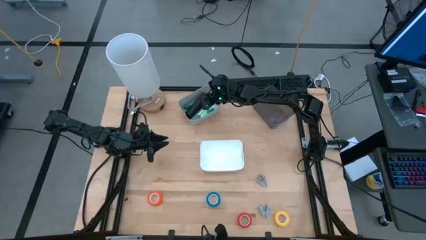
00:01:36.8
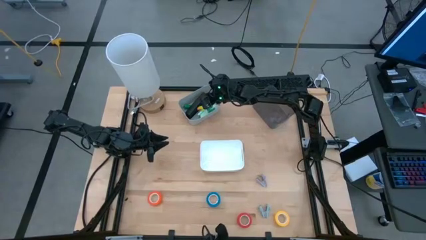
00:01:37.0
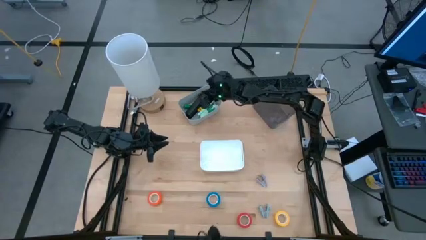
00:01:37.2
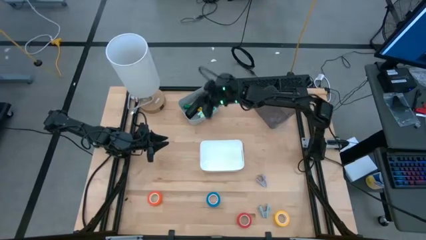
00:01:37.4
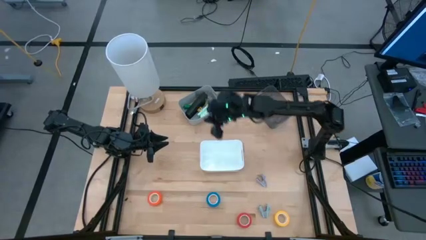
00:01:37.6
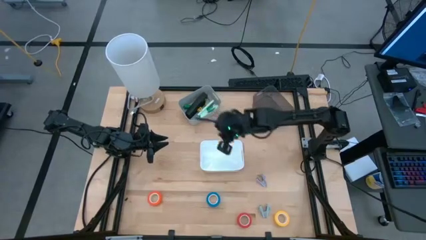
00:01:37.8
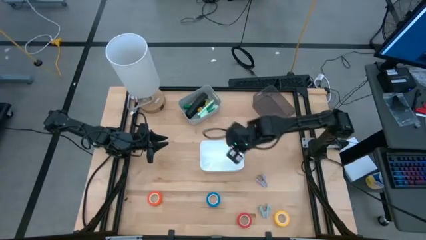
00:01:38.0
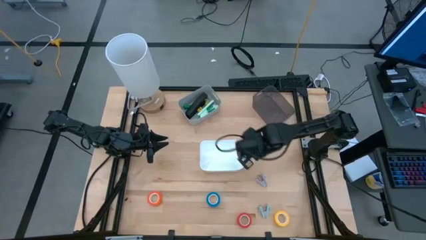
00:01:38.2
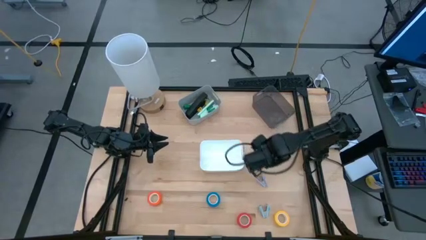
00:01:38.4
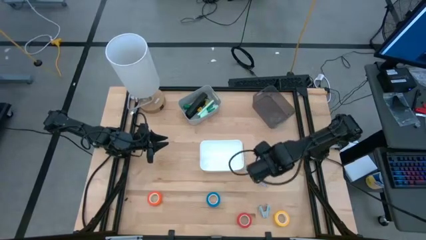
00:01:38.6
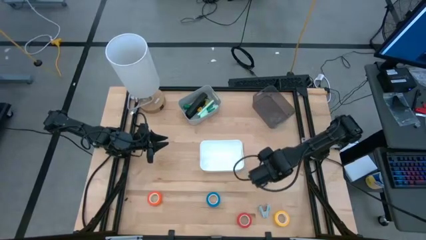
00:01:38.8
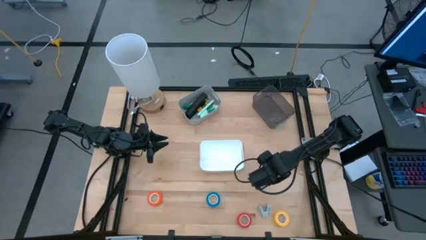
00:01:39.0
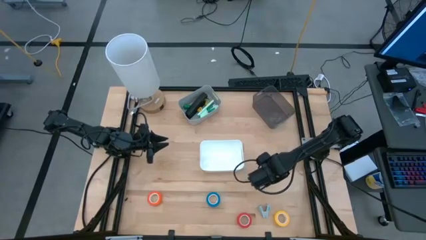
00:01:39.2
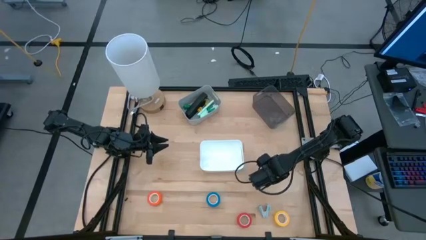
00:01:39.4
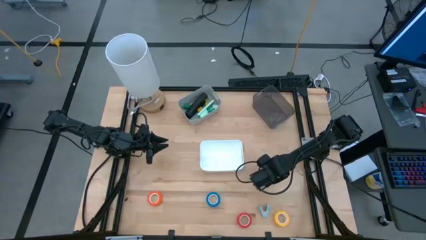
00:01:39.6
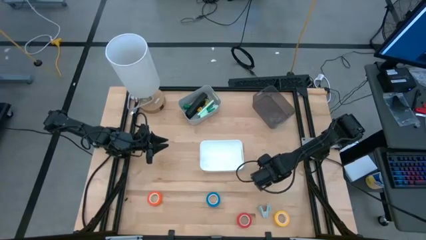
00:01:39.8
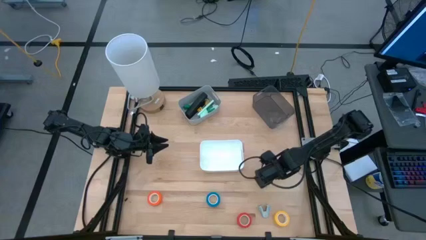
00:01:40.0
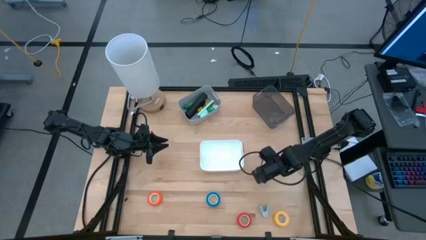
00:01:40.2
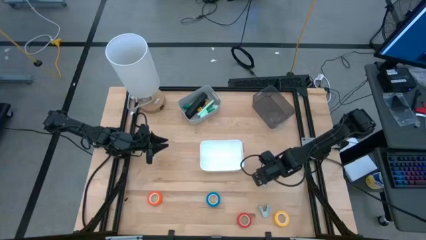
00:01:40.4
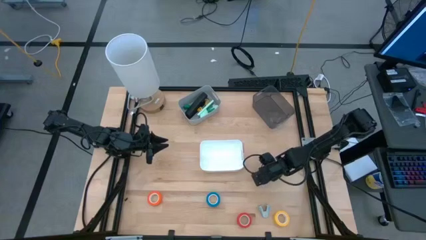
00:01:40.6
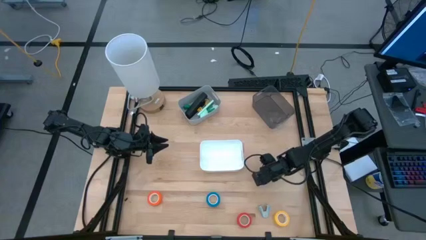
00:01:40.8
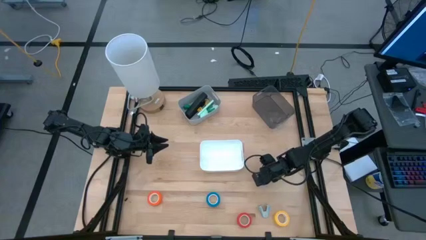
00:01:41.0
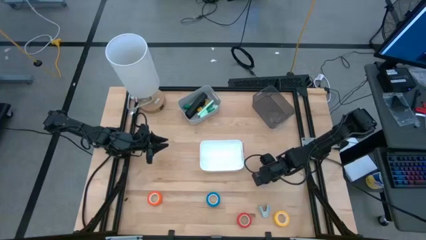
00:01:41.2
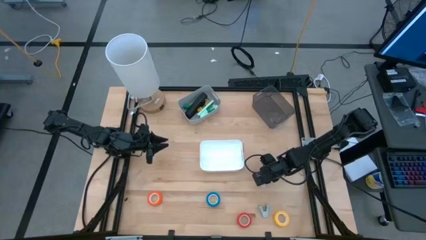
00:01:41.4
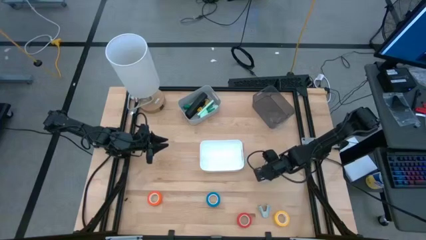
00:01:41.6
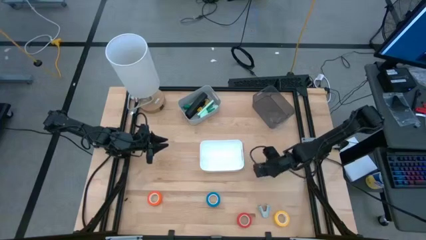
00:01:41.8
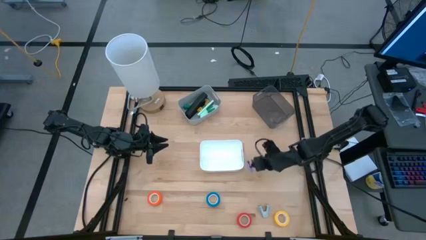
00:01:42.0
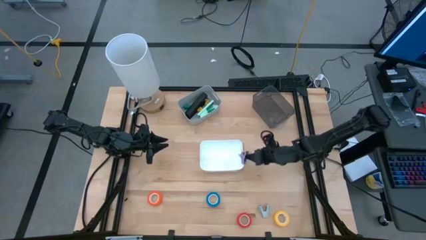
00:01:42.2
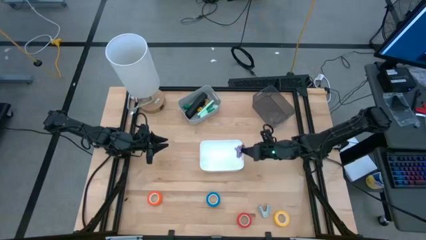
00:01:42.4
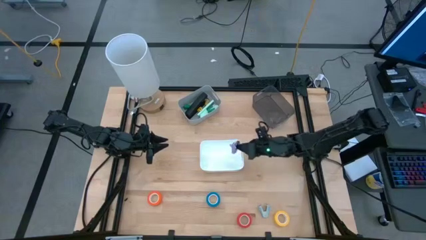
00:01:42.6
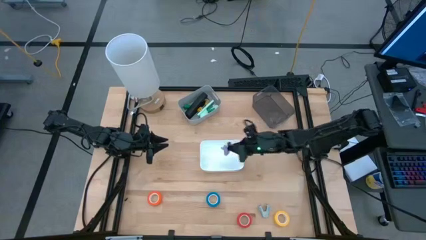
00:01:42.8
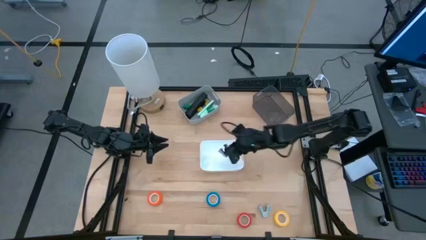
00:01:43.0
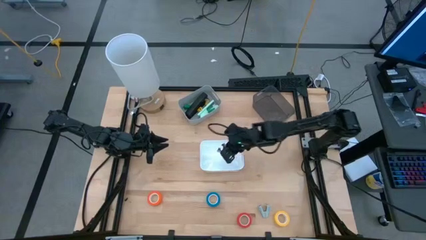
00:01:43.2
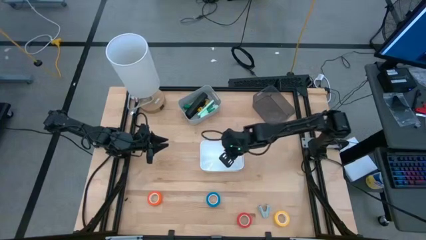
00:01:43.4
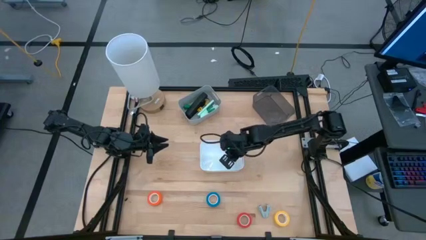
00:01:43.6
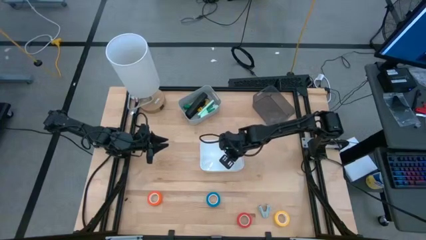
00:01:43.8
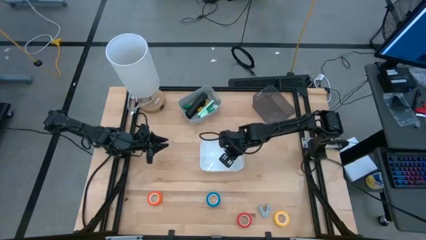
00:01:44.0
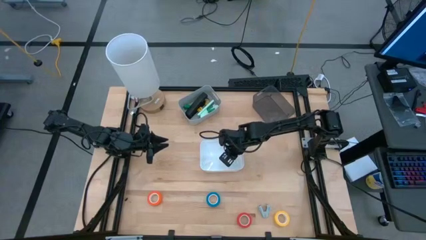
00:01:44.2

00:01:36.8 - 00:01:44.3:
Task: Pick and place Stapler, Stapler remover, tape
Put the purple staple remover into the white bin

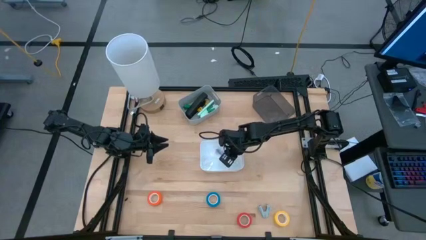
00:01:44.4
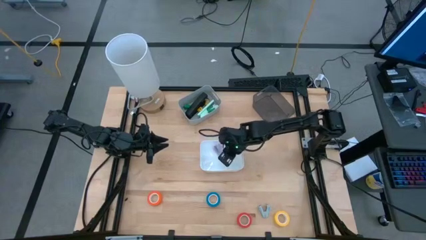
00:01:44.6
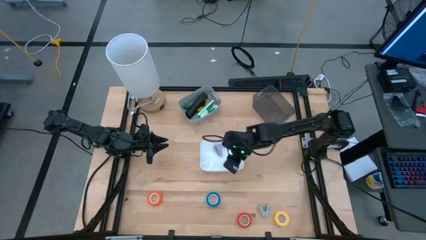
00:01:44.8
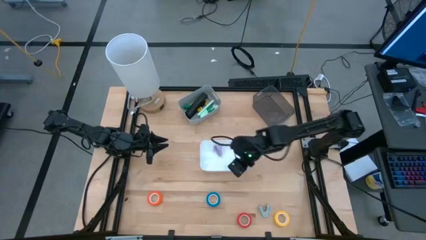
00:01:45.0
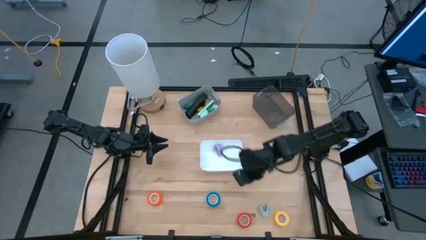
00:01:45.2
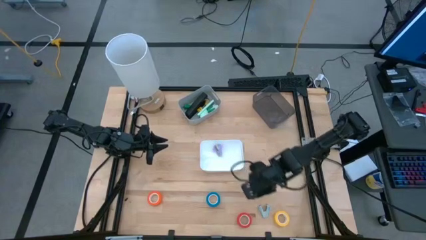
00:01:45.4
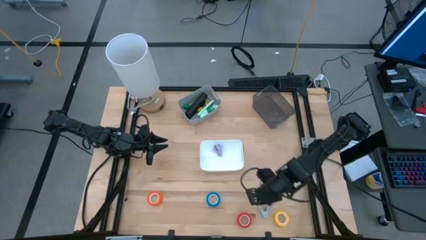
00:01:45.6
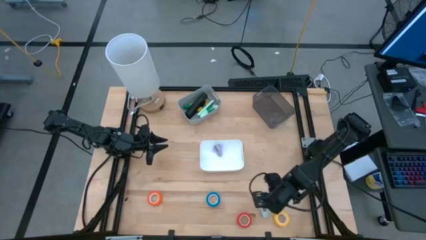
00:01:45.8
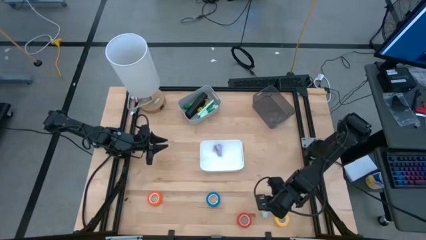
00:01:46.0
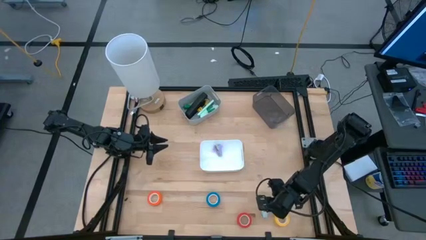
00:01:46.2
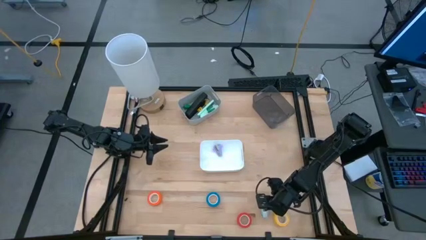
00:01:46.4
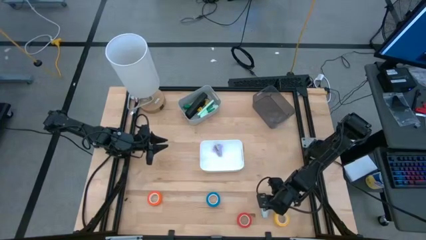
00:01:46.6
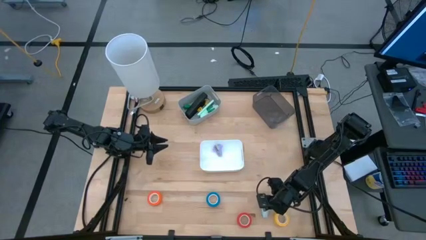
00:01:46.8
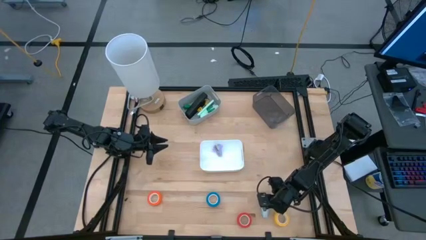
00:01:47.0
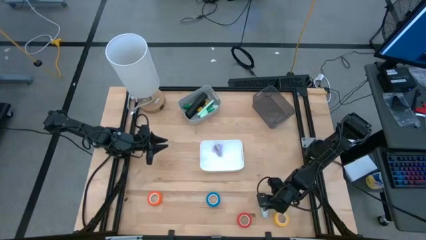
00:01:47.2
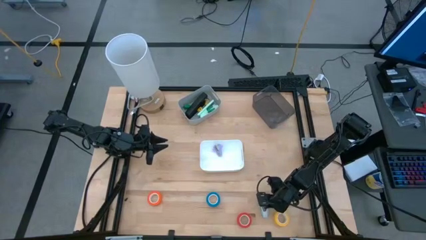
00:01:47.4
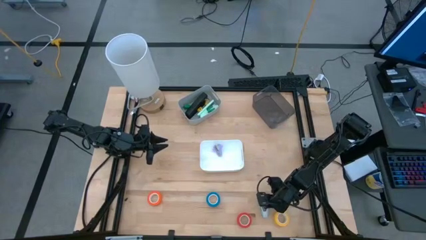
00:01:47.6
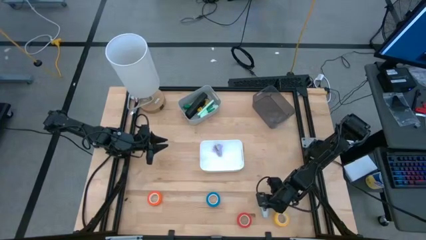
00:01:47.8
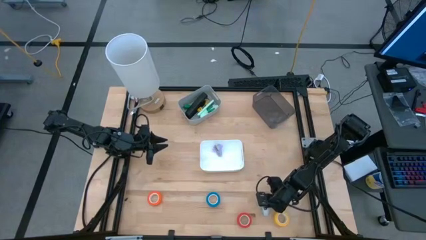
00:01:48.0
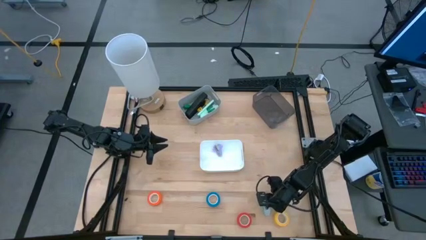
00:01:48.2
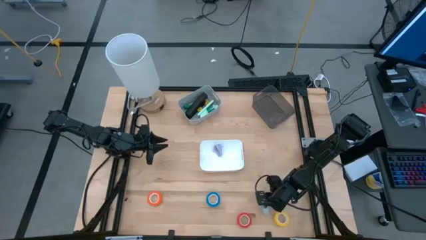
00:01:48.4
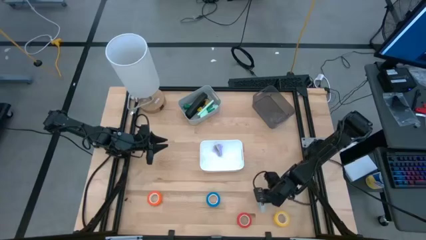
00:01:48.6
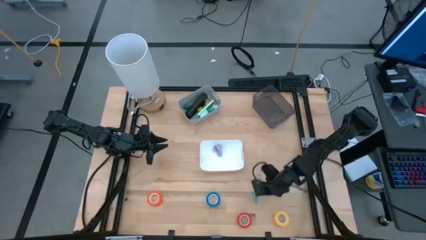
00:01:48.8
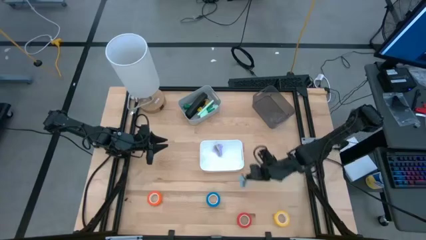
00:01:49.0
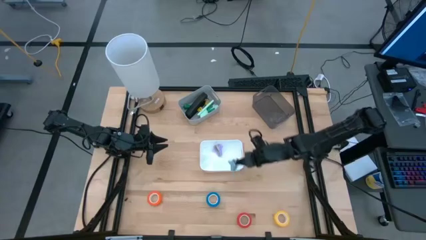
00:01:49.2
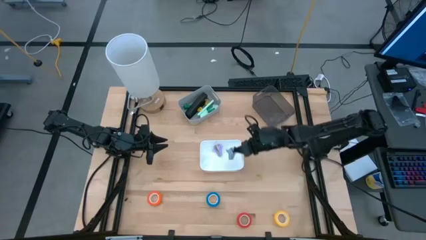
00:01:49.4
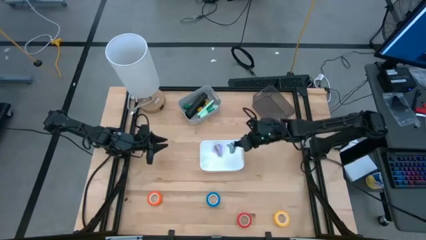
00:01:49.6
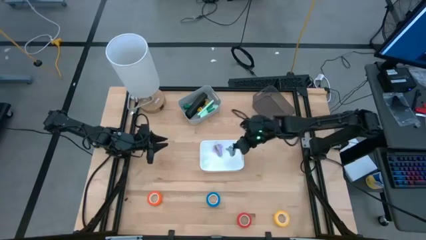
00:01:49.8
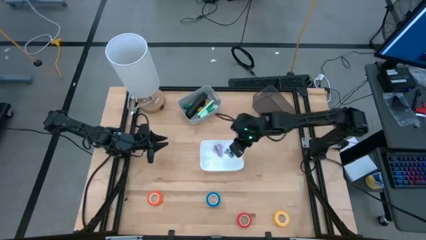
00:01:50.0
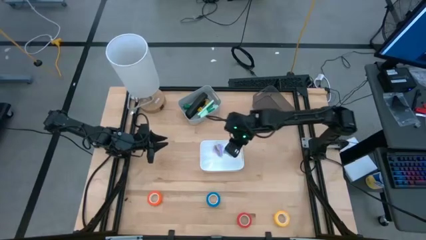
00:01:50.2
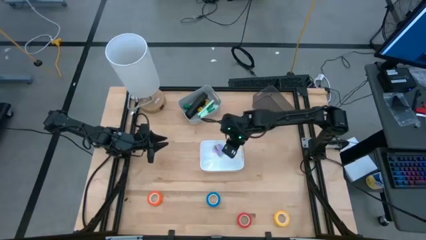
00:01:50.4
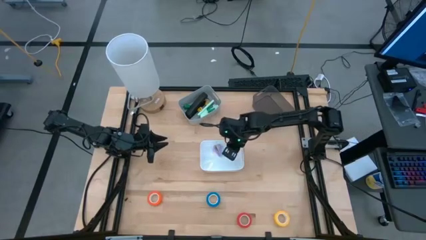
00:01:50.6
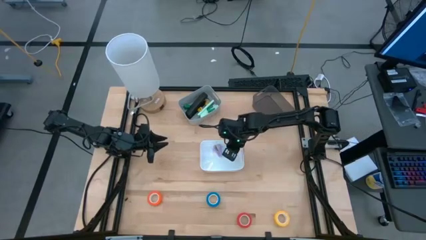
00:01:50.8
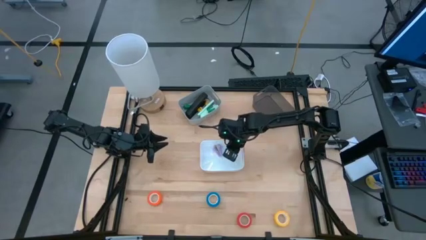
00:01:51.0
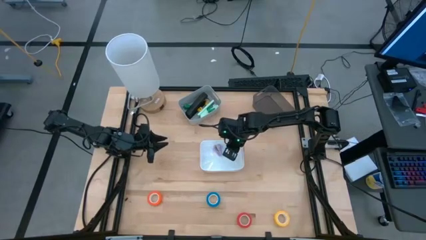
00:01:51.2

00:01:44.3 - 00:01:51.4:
Put the gray staple remover into the white bin

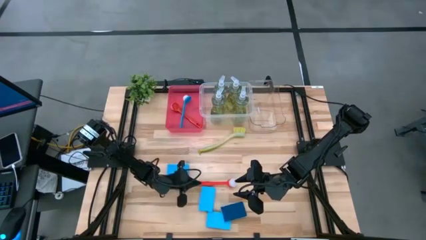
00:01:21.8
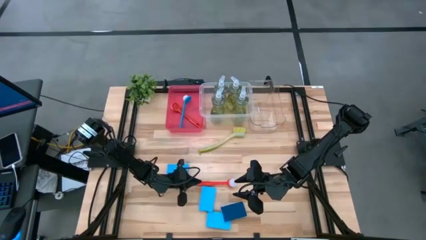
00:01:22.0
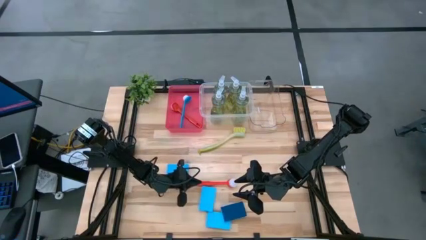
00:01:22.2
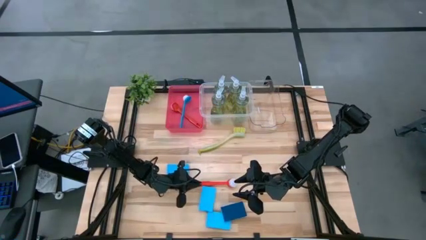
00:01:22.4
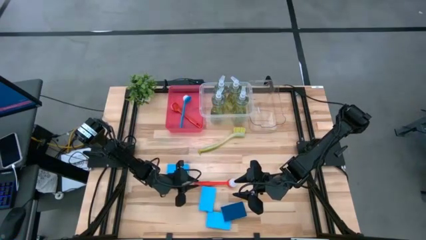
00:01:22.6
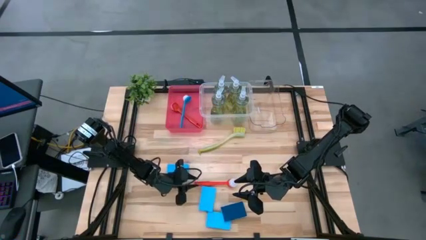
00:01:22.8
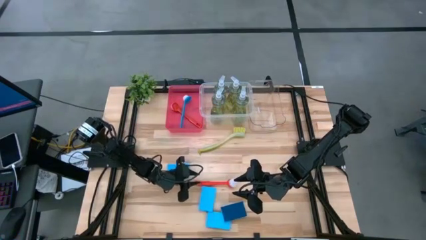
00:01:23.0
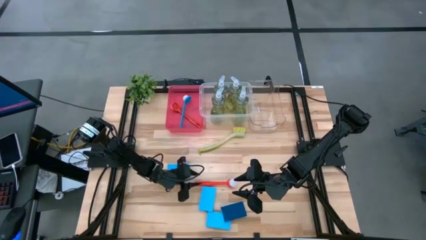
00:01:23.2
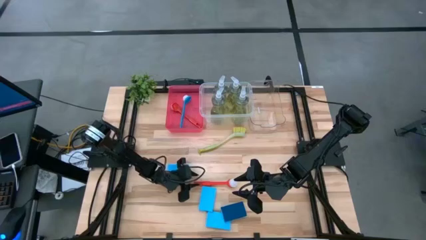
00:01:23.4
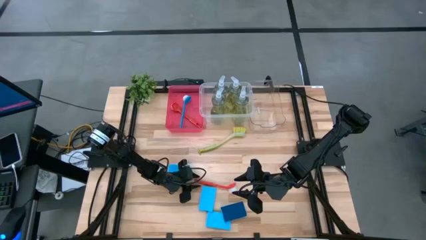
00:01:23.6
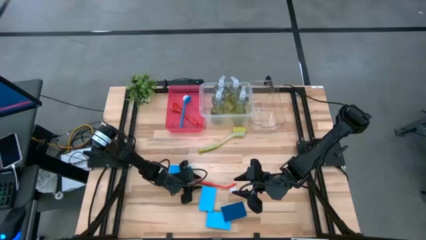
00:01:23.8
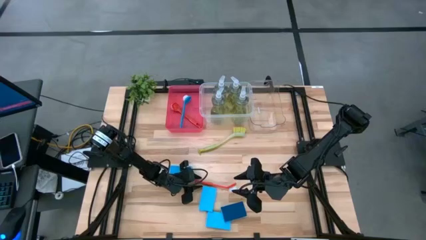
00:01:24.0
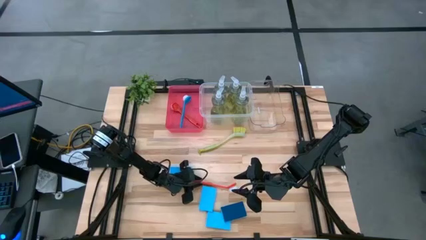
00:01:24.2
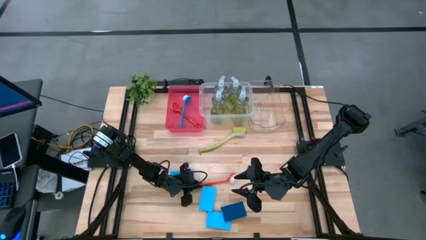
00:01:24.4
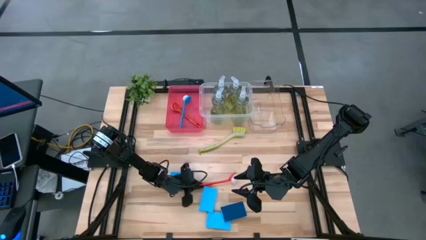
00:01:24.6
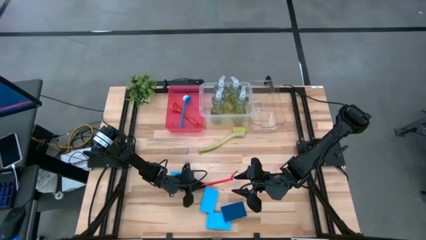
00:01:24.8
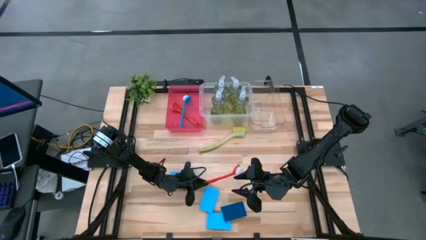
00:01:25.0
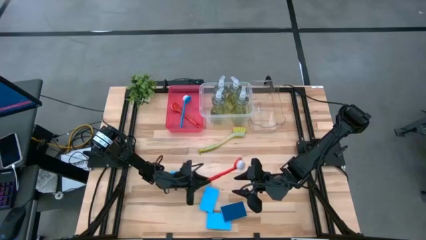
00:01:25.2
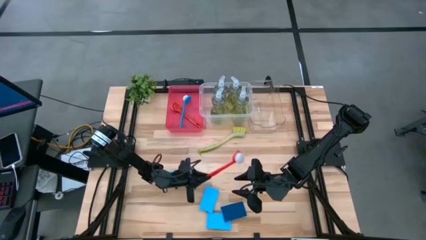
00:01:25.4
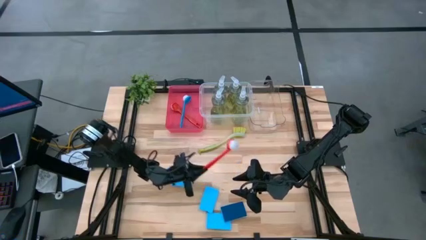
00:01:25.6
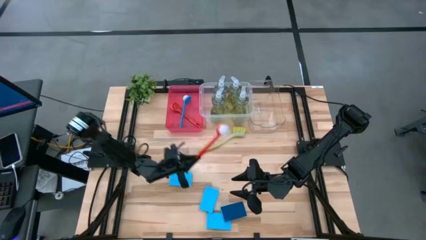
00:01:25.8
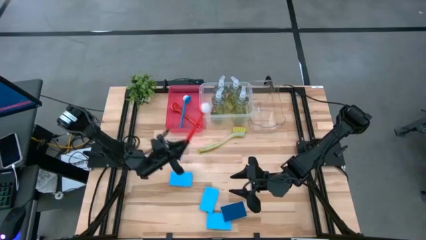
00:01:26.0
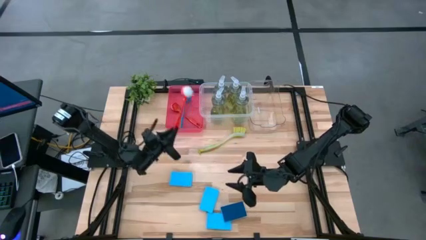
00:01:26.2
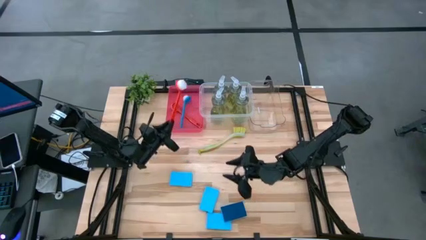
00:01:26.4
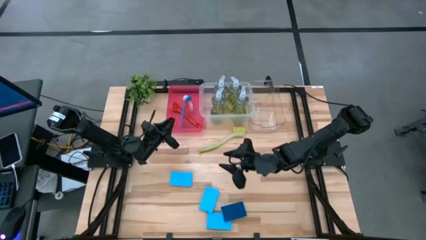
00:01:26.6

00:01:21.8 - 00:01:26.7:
Task: Pick & Place Kitchen Sink Supplies
Put the red toilet brush into the red bin
